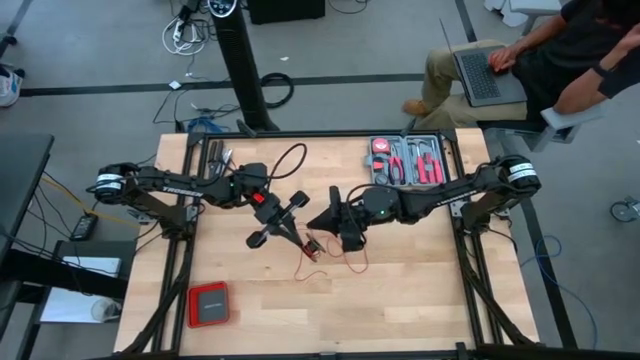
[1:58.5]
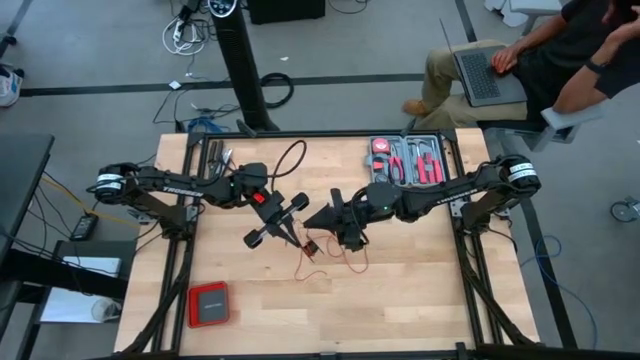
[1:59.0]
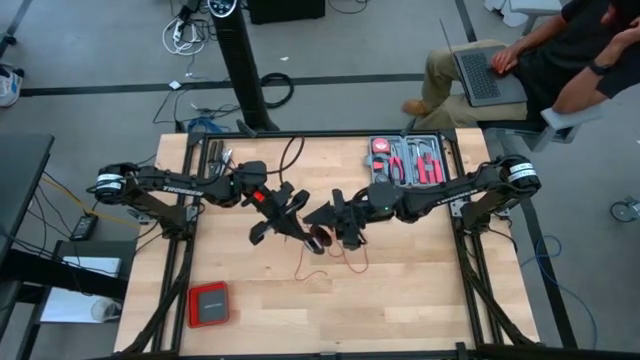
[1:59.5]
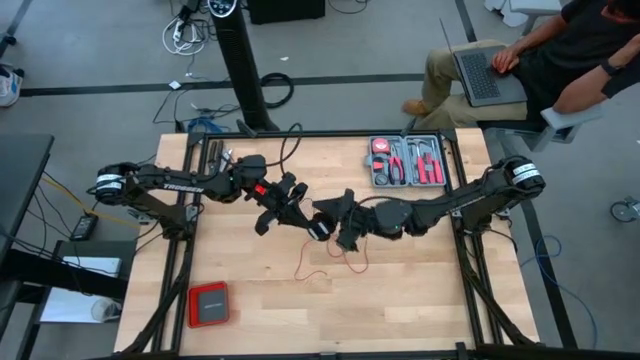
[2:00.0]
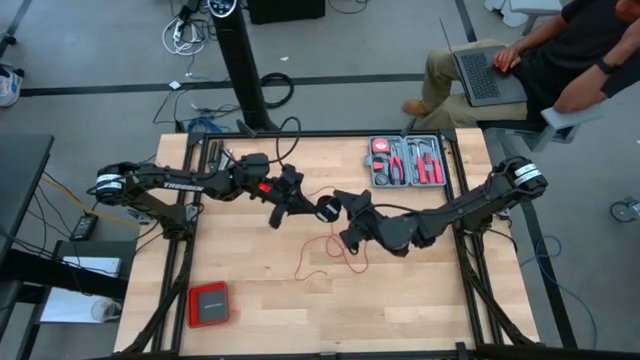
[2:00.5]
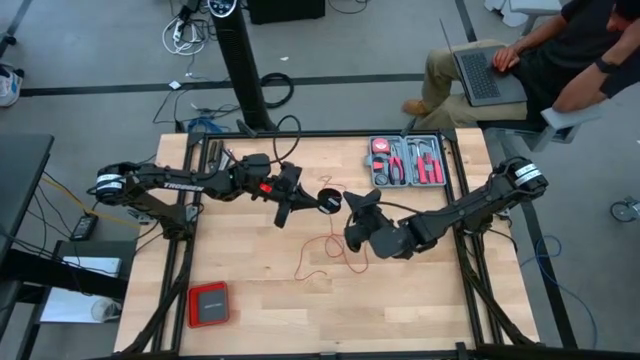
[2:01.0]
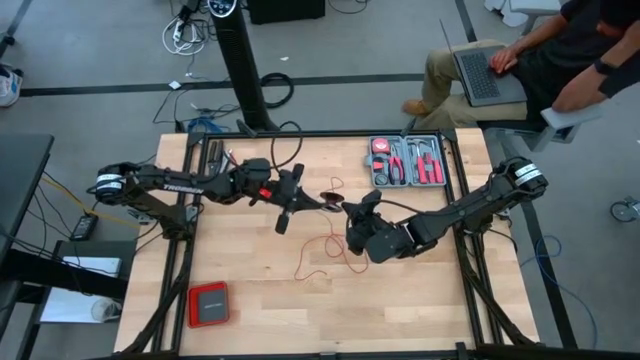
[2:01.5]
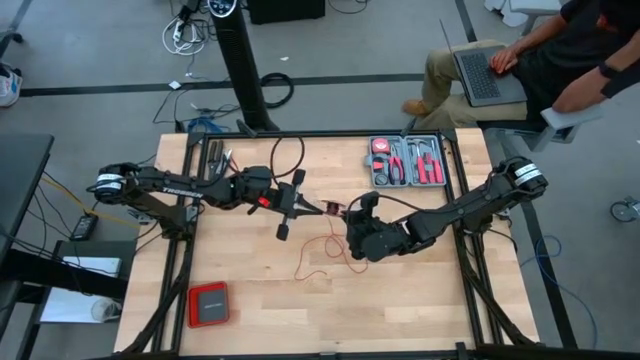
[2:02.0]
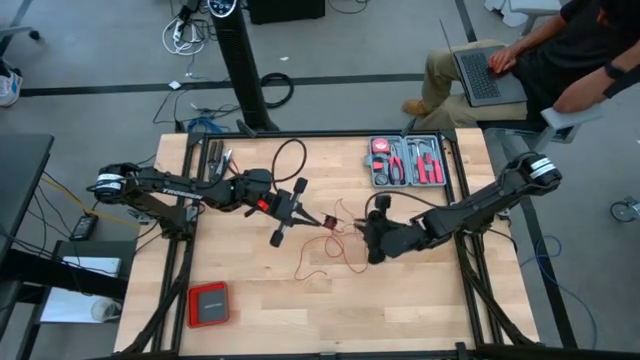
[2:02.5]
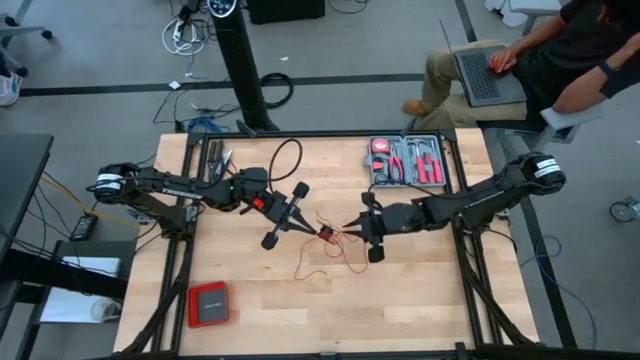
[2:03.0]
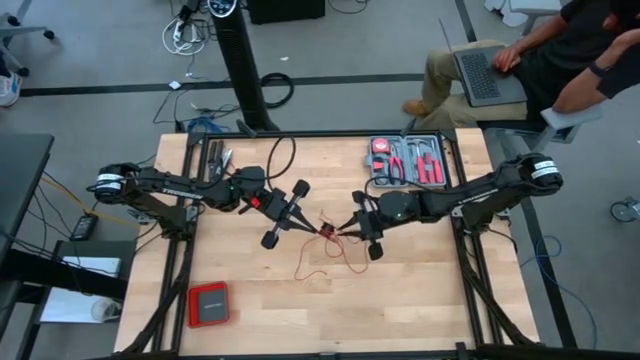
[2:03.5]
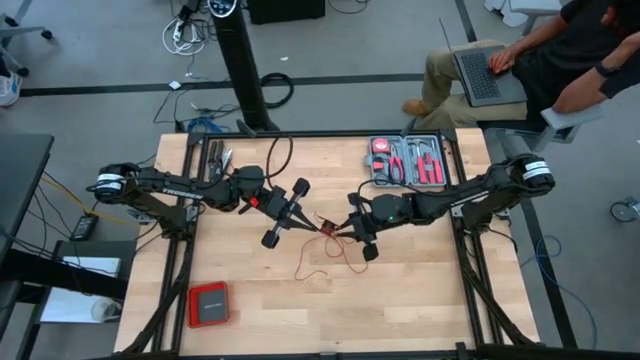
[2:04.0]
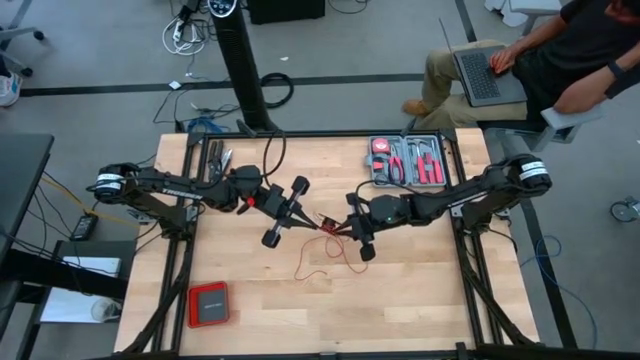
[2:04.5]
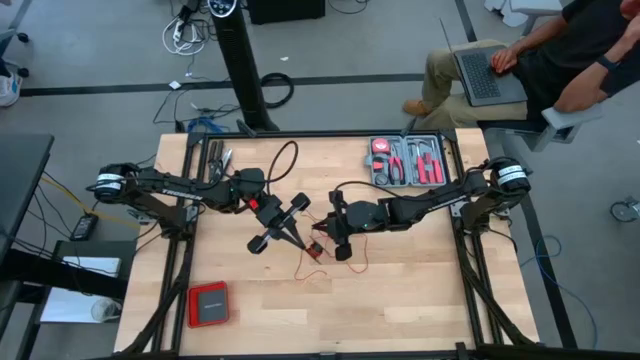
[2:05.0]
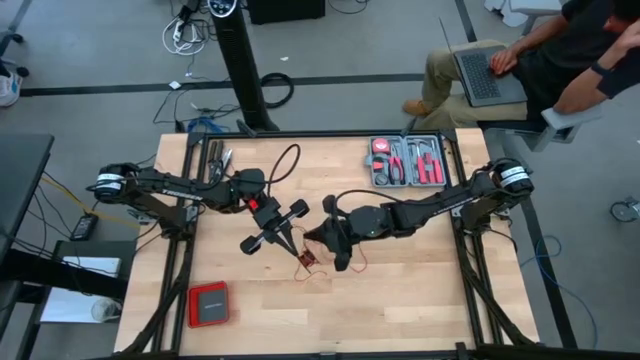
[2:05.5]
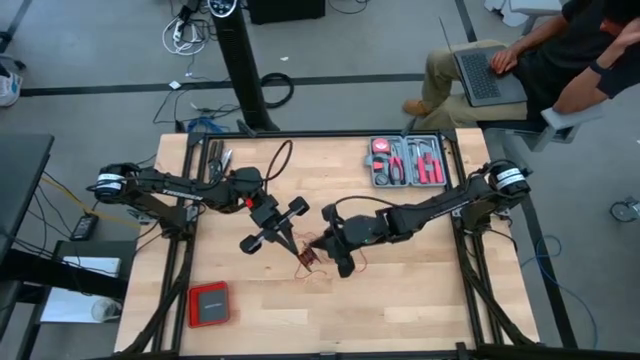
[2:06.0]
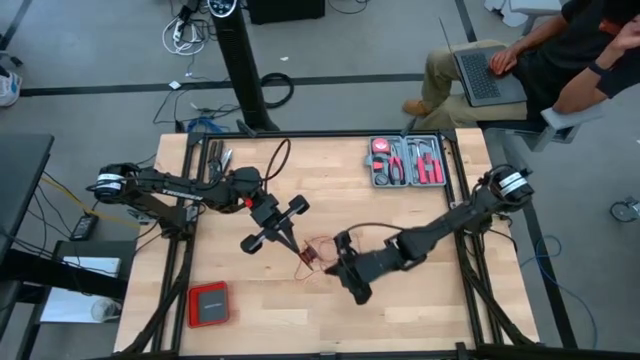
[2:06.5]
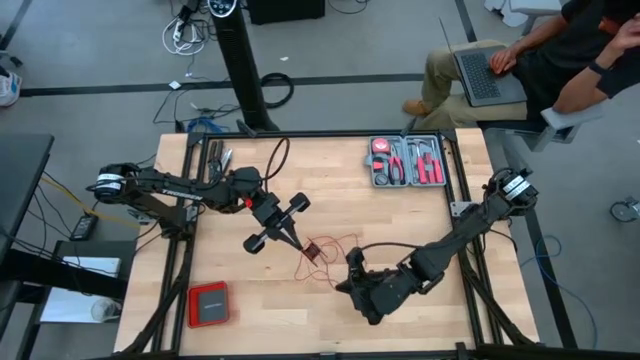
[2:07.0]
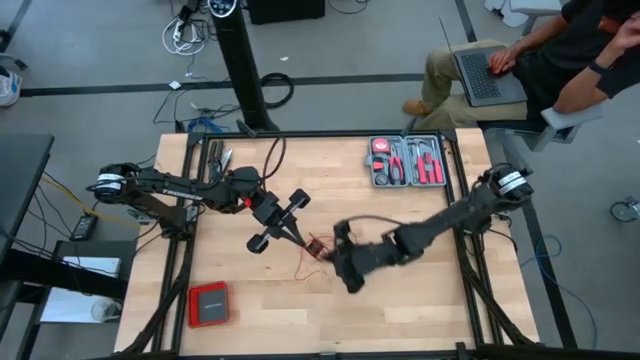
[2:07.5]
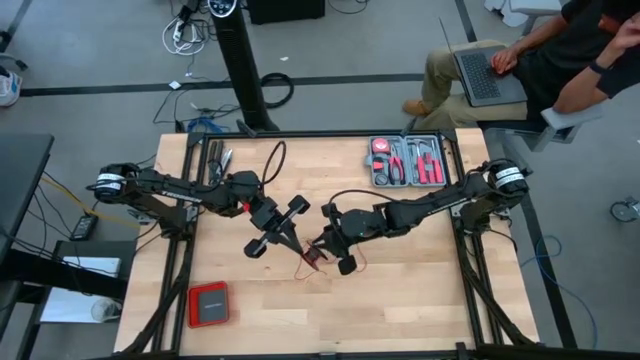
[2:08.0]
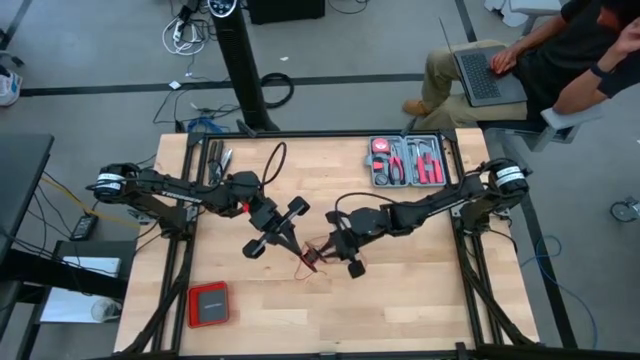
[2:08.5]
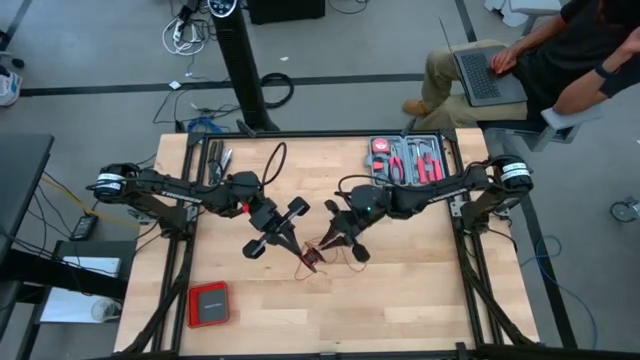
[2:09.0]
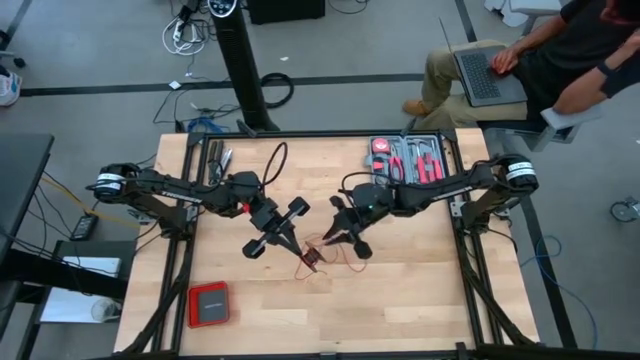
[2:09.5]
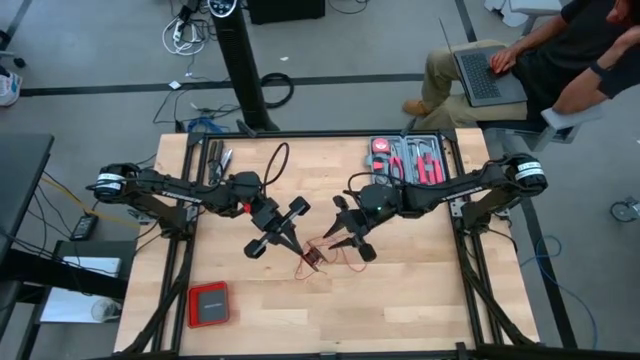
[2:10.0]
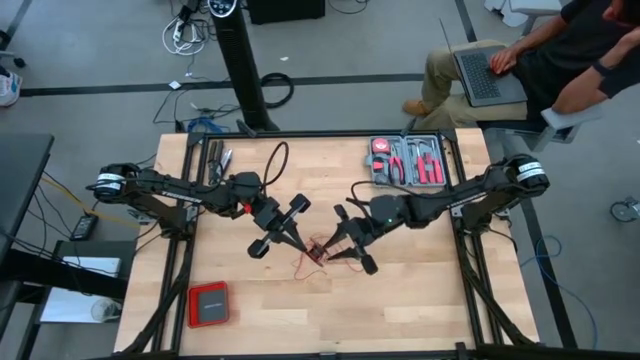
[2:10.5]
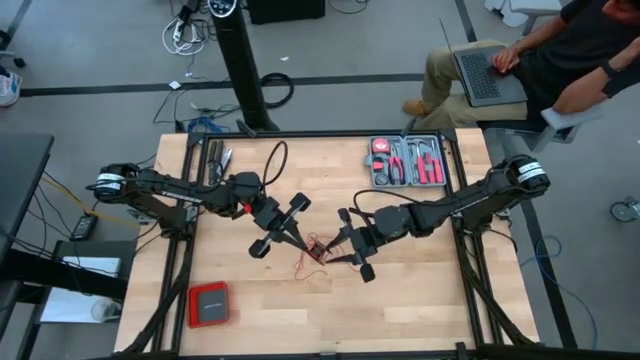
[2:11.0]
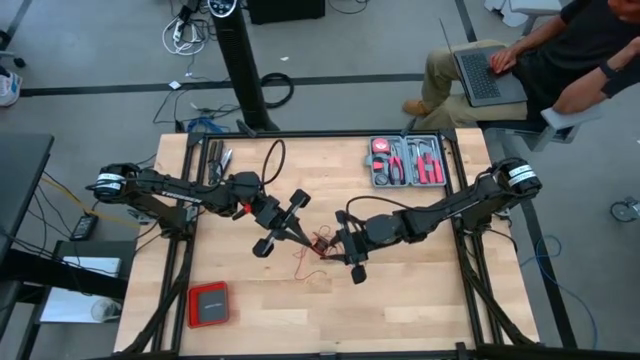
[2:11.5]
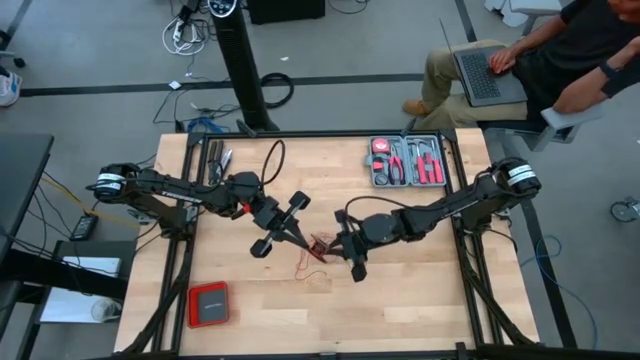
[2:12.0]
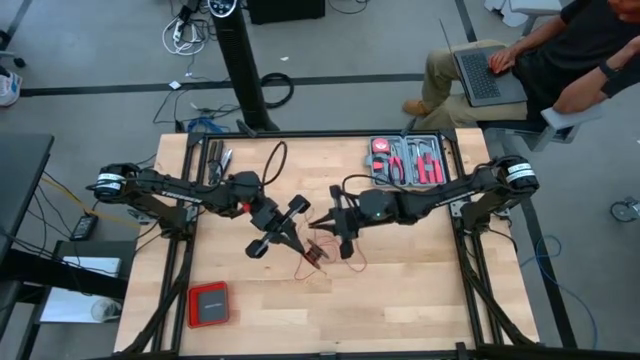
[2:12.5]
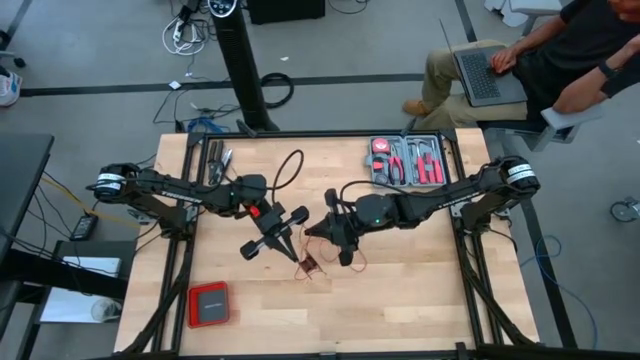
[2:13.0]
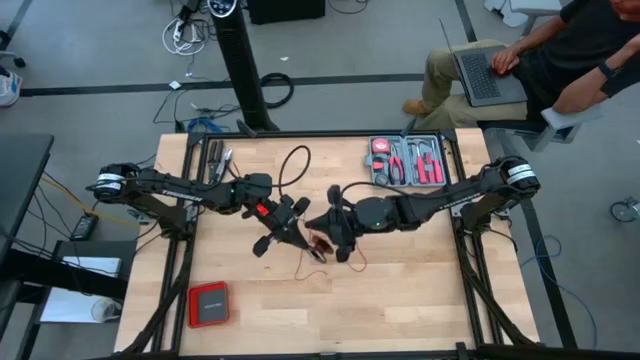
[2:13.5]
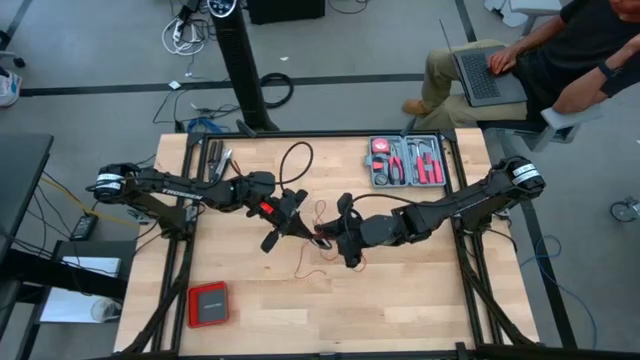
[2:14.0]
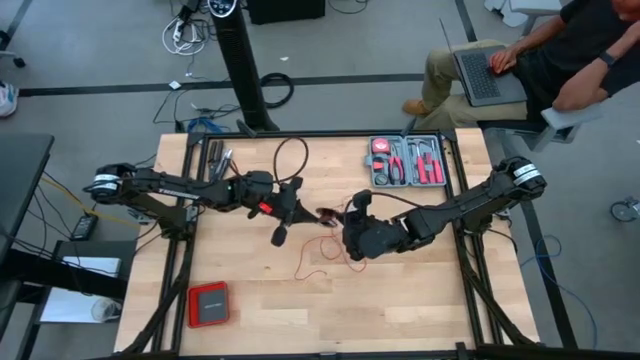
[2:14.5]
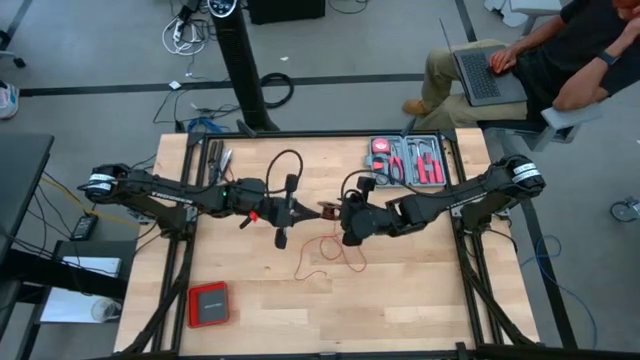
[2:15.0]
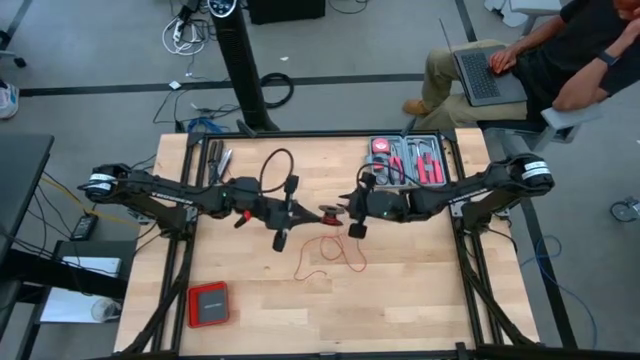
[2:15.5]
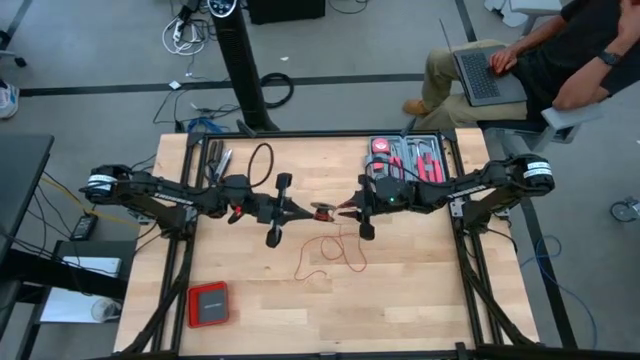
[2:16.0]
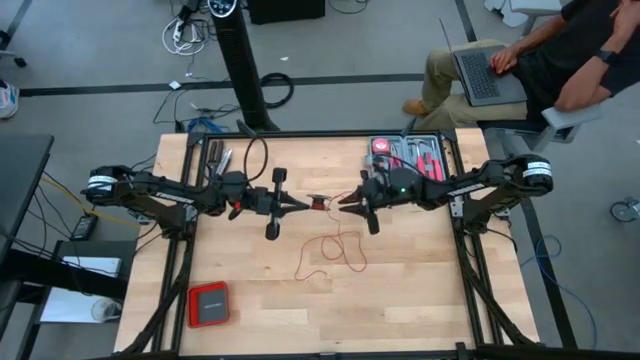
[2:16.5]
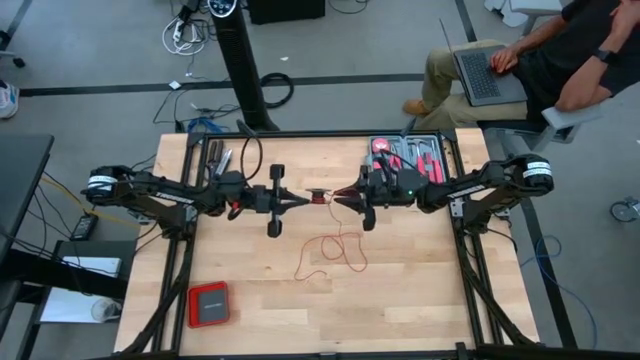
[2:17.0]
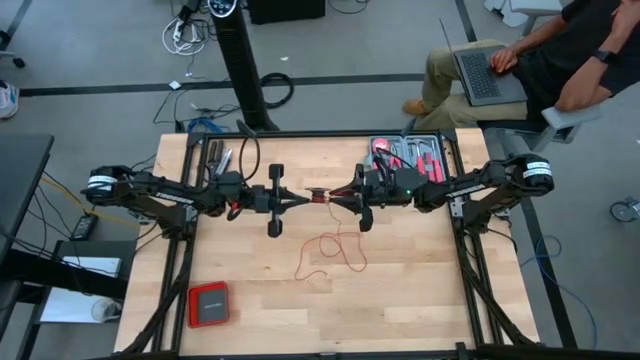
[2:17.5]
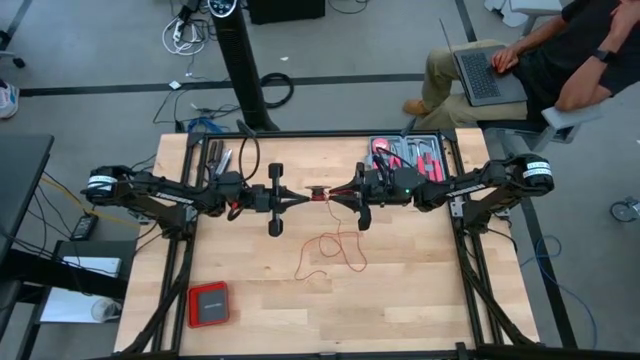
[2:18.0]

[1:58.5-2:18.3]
Task: Coil cords
Coil the red cable wire onto the black spool

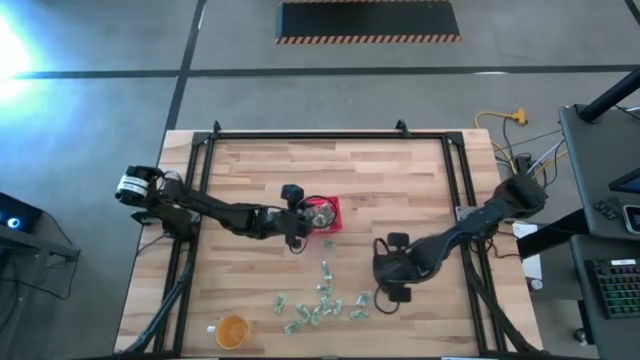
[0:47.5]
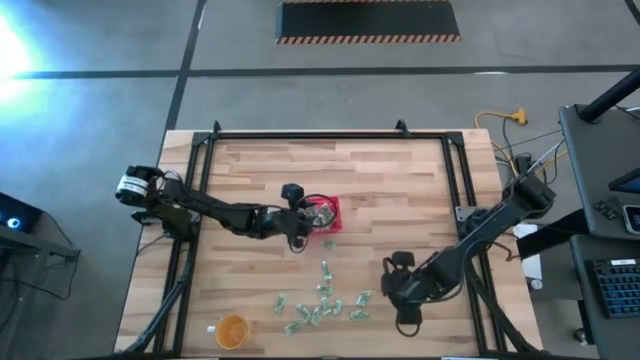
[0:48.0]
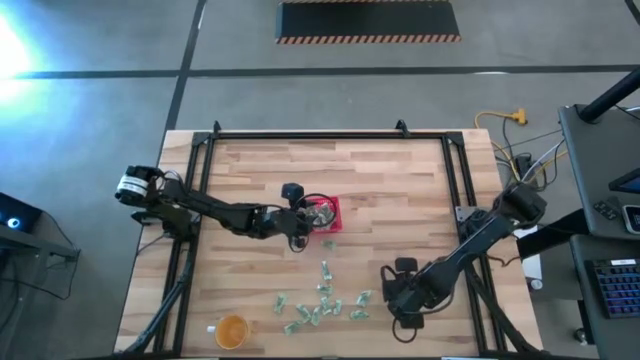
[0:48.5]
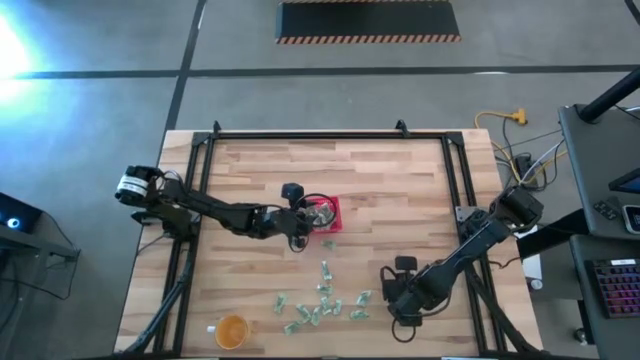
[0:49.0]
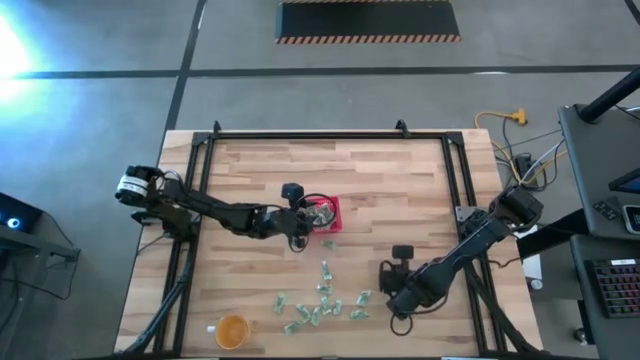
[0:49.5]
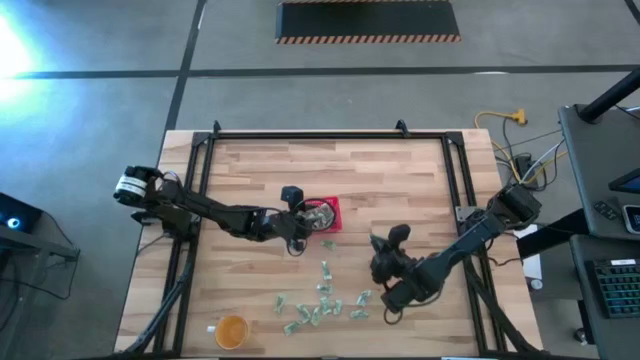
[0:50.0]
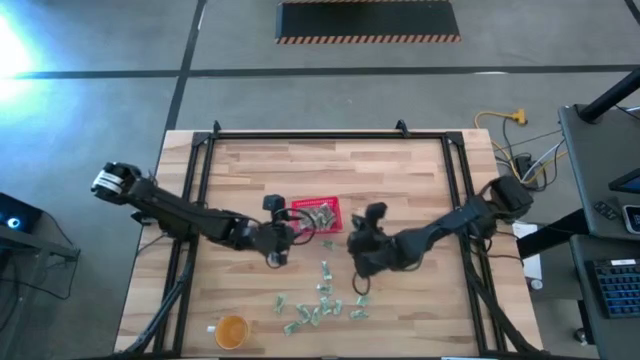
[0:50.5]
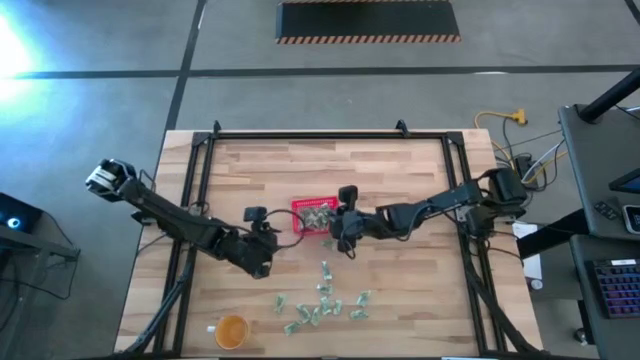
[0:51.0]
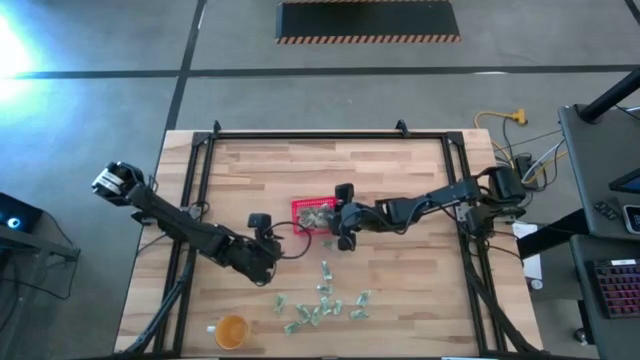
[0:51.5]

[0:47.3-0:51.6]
Task: Pick and place items into bin
Put the stevia packet into the red bin
